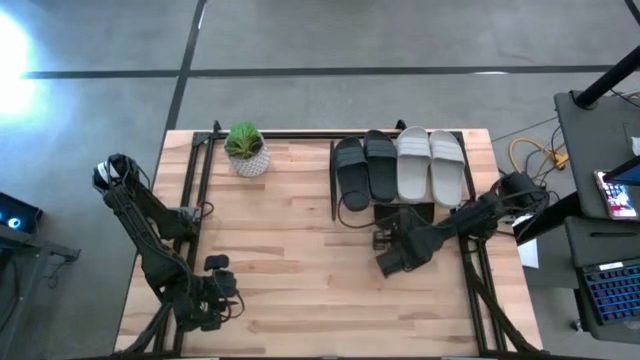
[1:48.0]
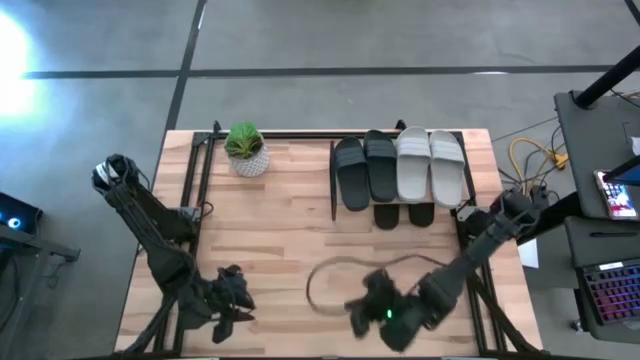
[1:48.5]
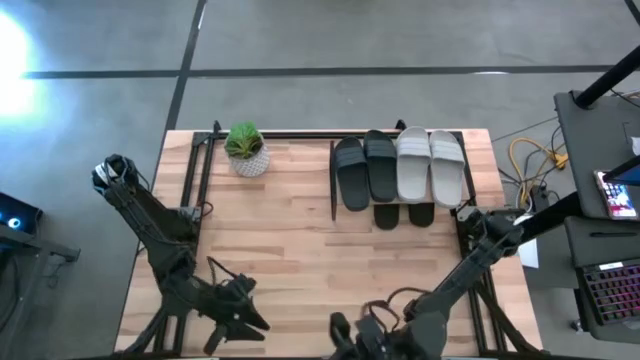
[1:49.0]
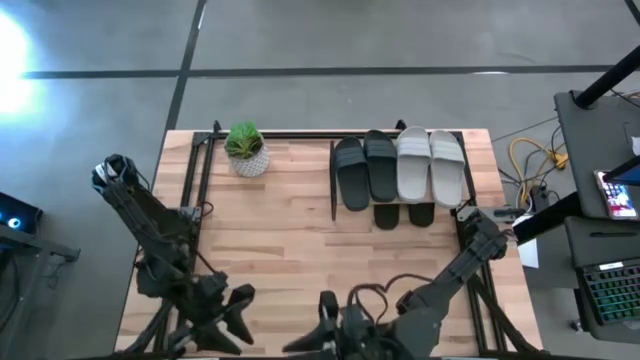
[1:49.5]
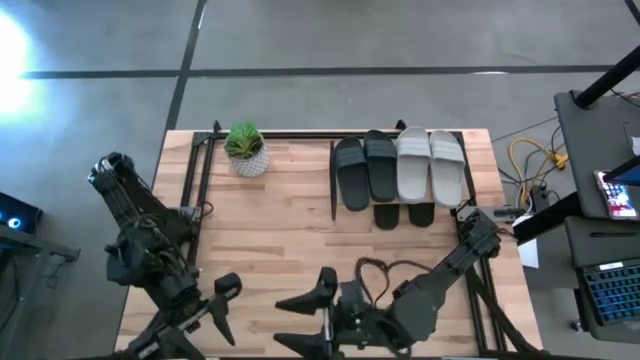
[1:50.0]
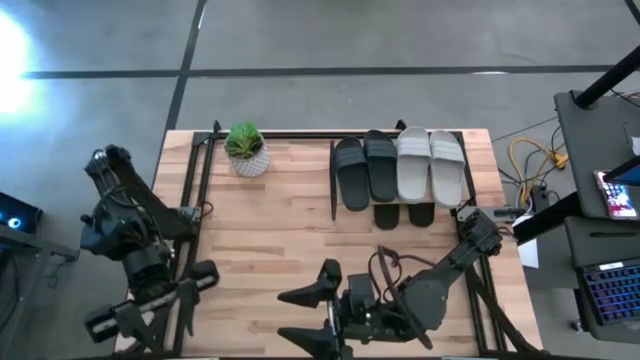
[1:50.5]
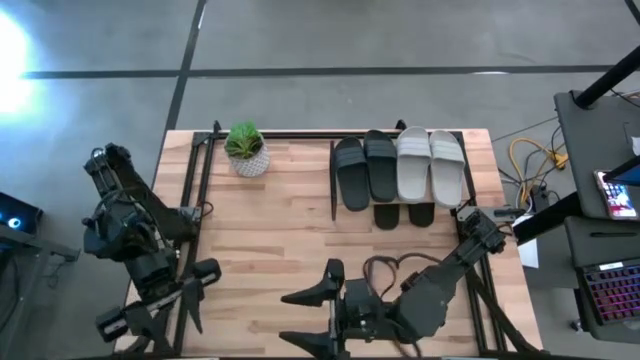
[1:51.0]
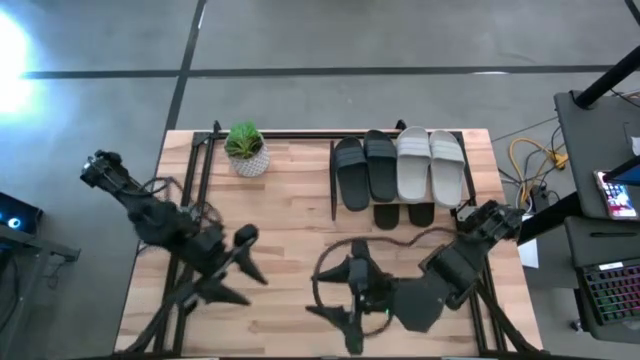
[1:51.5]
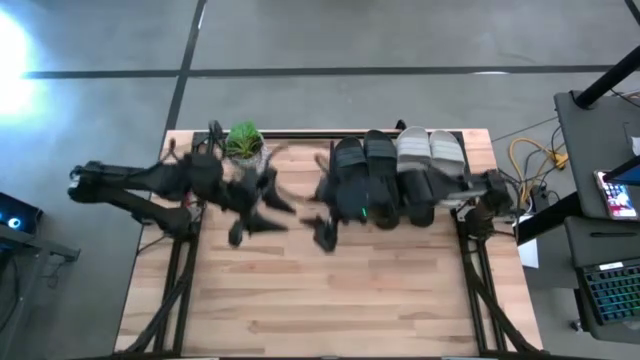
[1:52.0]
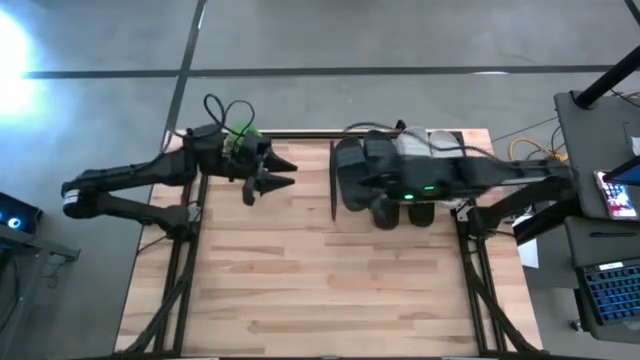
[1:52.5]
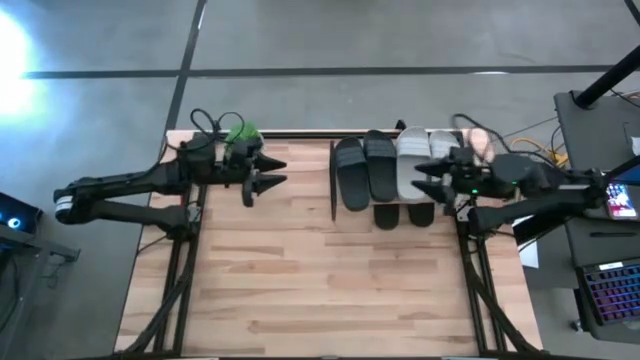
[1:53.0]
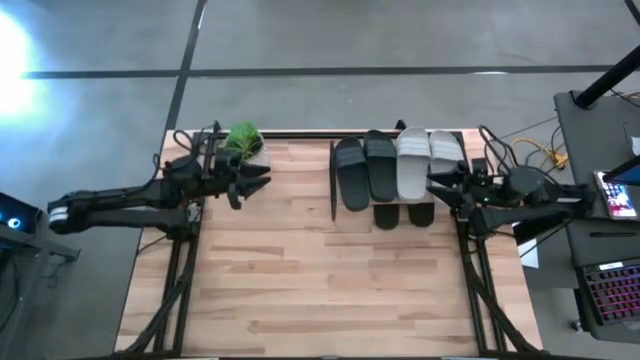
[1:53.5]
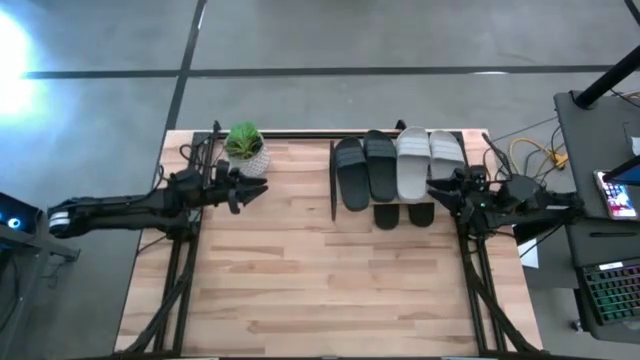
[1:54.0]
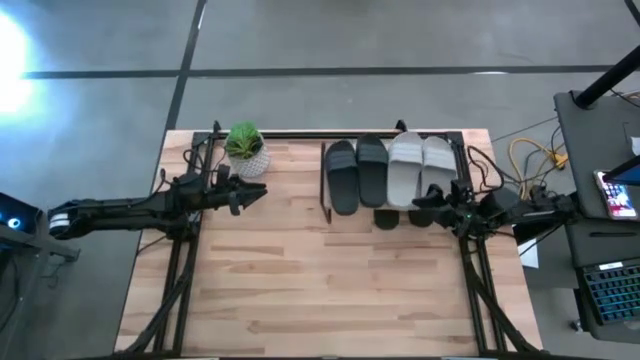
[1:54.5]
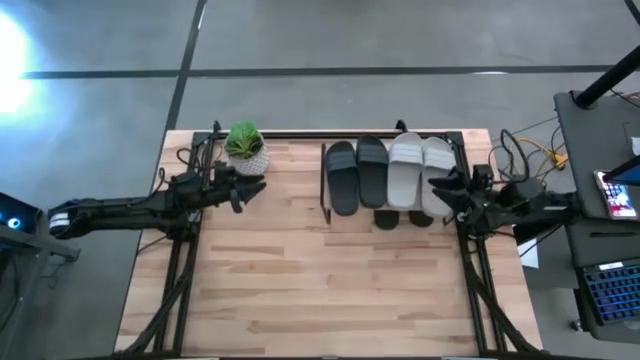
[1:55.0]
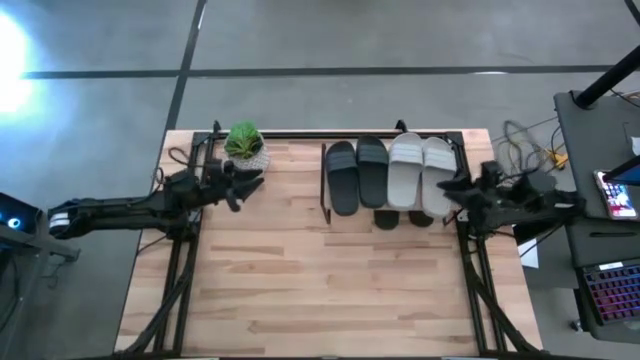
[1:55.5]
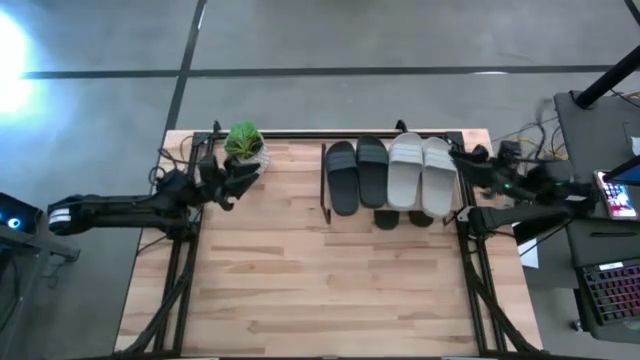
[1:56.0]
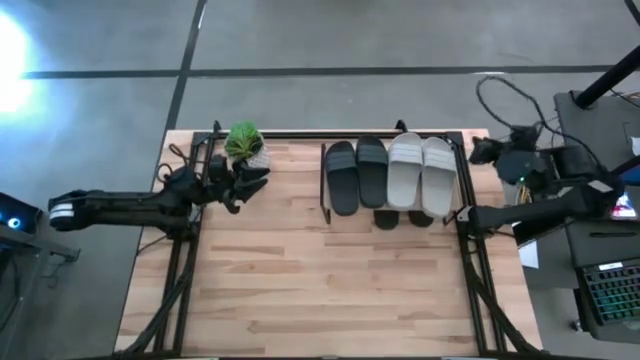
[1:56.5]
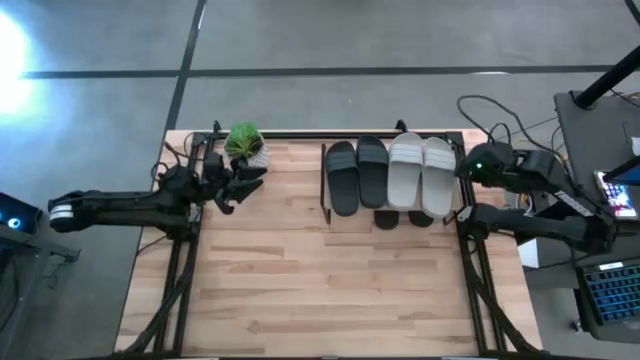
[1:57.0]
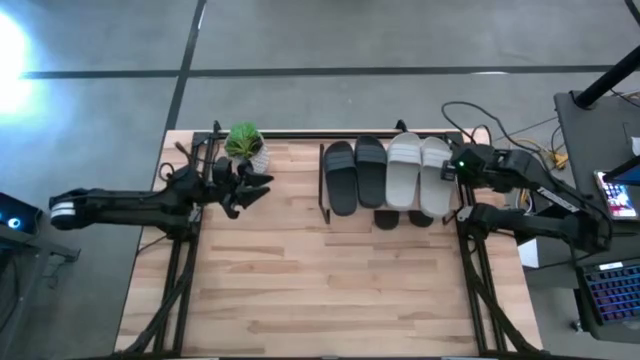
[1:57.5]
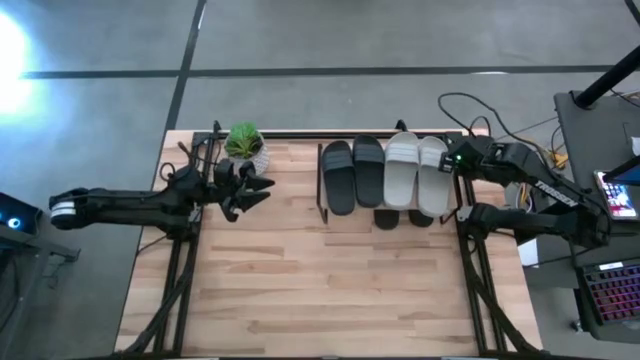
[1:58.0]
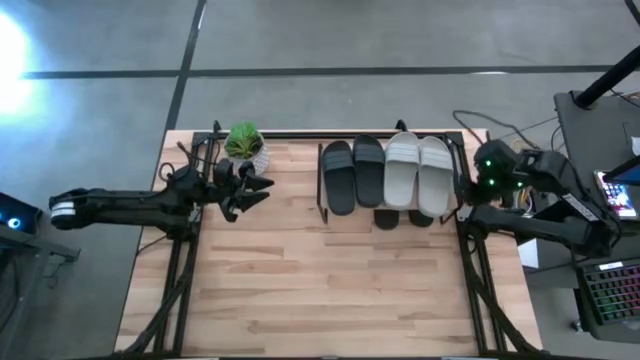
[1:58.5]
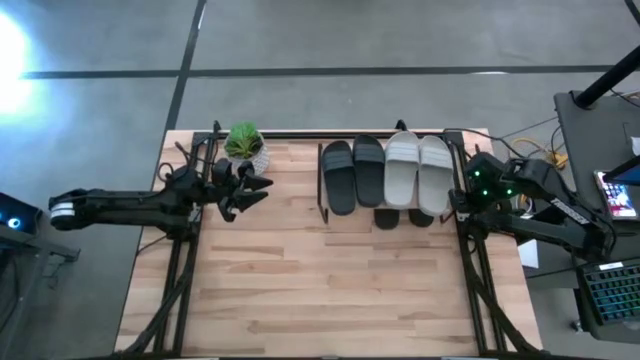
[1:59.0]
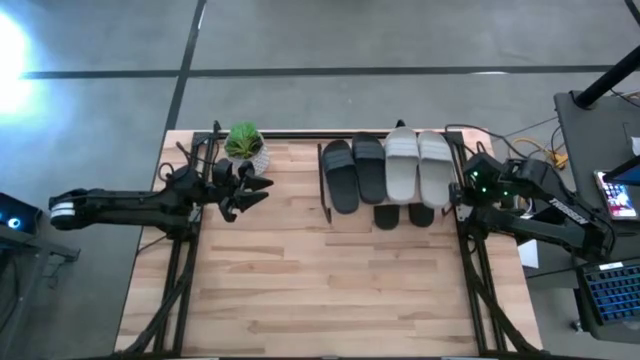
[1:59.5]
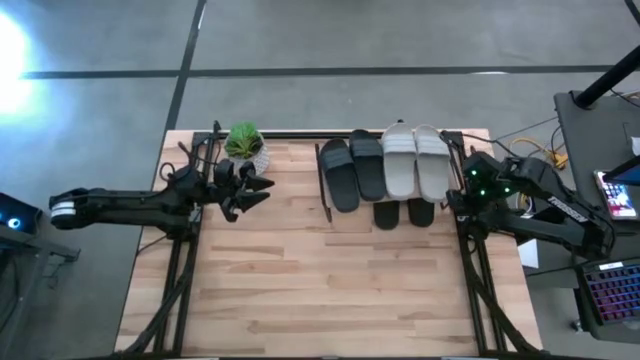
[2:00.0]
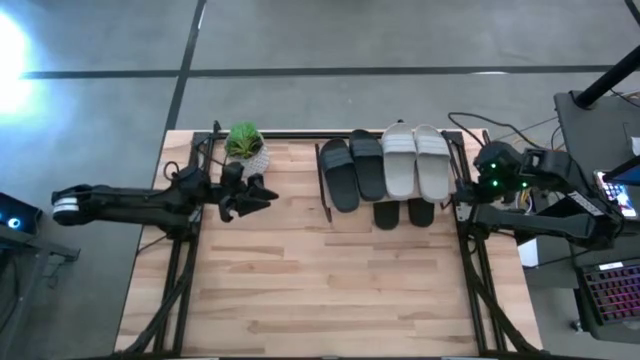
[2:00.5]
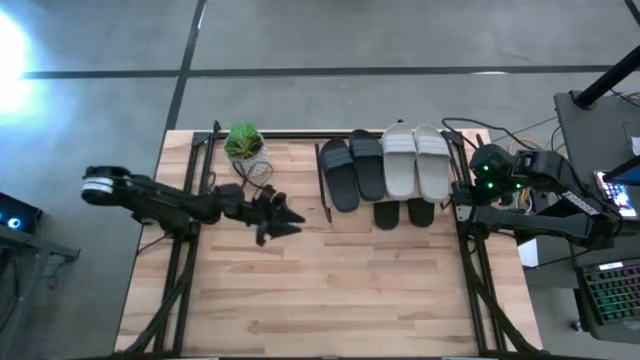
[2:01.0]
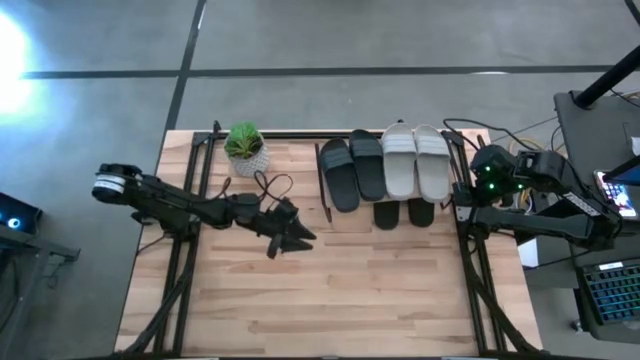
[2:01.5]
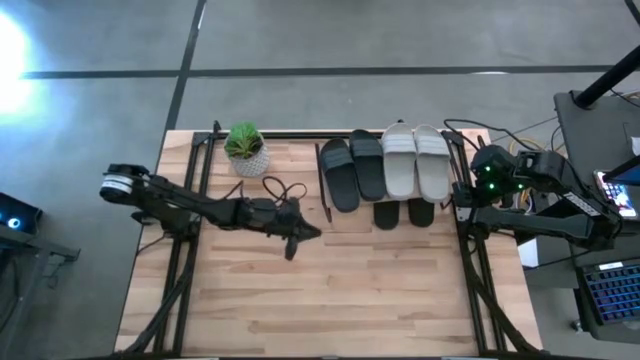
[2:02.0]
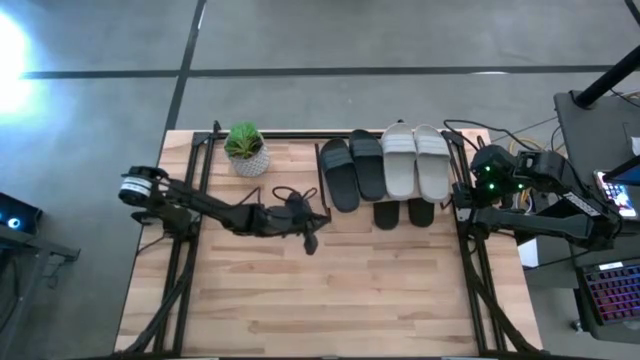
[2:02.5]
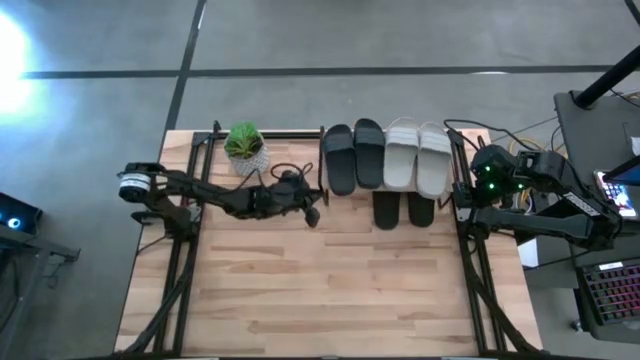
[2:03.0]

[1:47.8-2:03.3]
Task: Pick and place slides into the shelf
Adjust the shelf

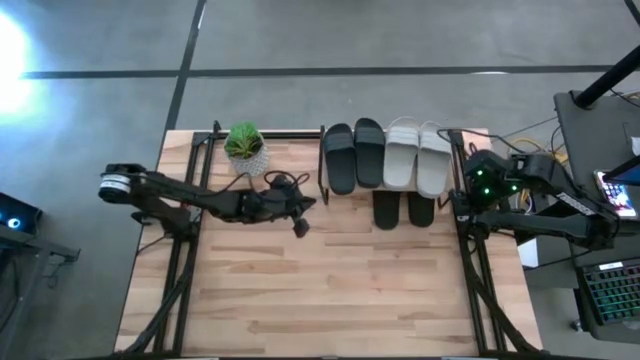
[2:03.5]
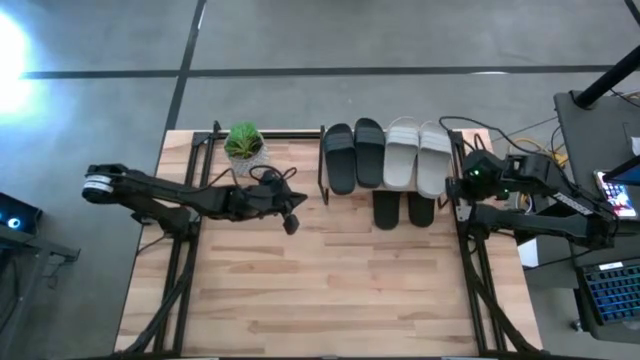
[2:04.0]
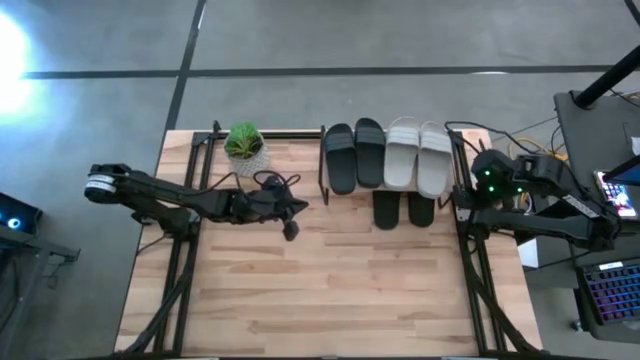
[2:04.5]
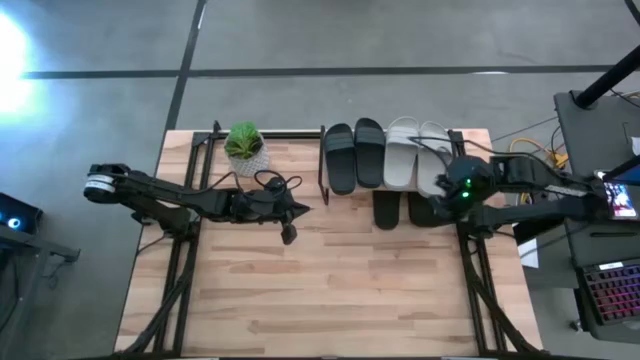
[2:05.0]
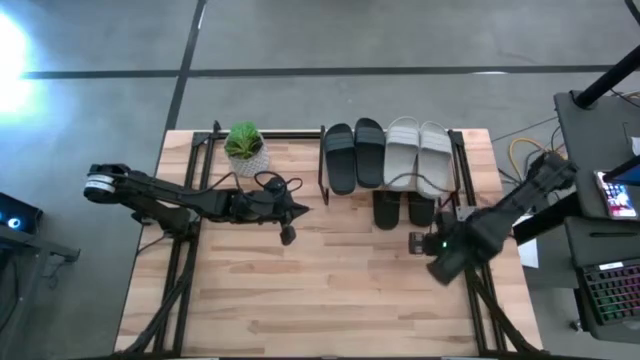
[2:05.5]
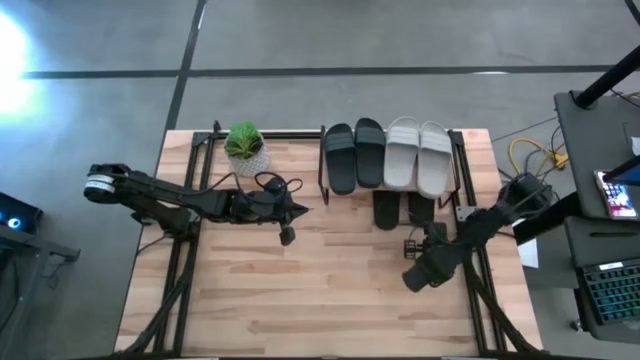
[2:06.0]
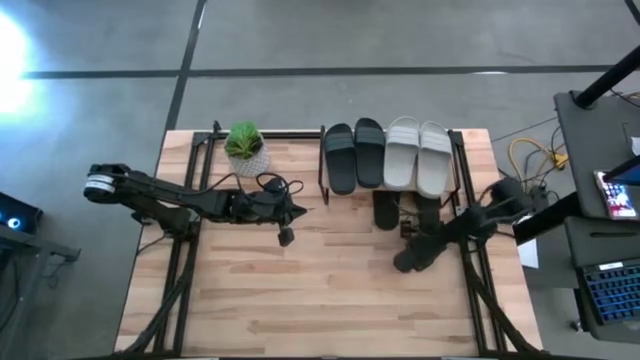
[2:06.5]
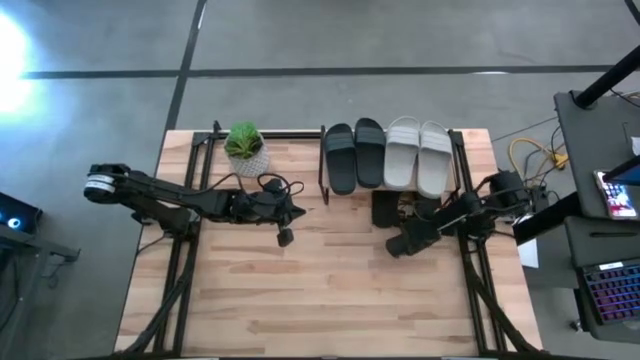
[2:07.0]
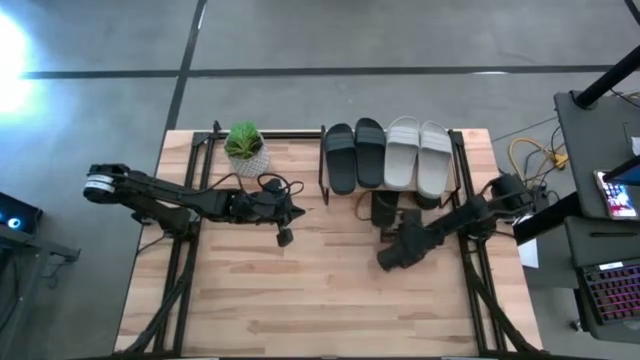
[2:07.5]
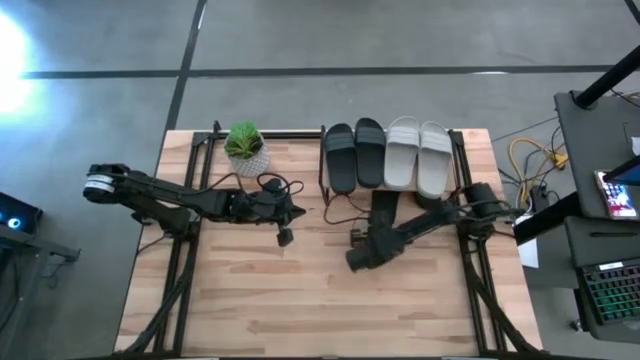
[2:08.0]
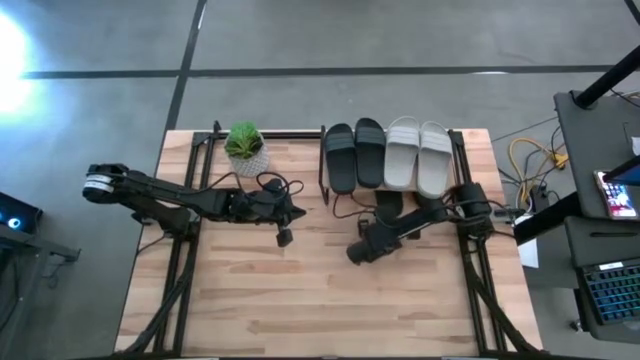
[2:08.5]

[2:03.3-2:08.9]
Adjust the black slides under the shelf
